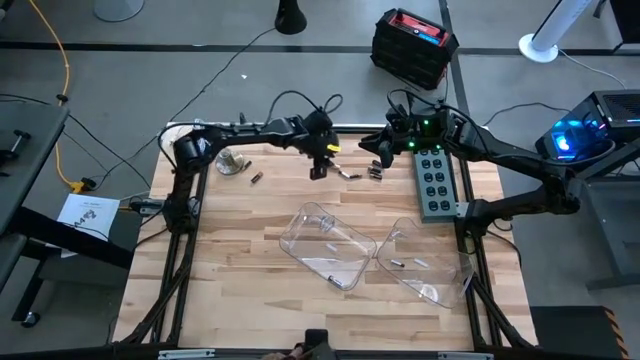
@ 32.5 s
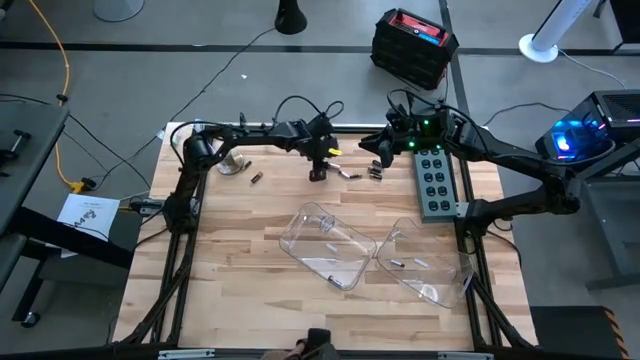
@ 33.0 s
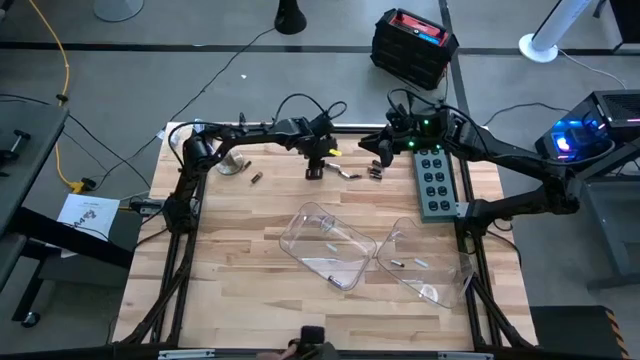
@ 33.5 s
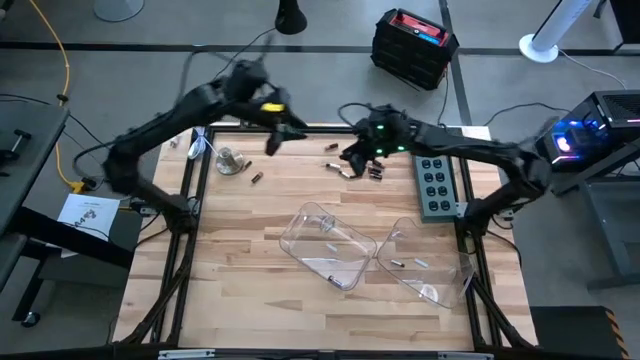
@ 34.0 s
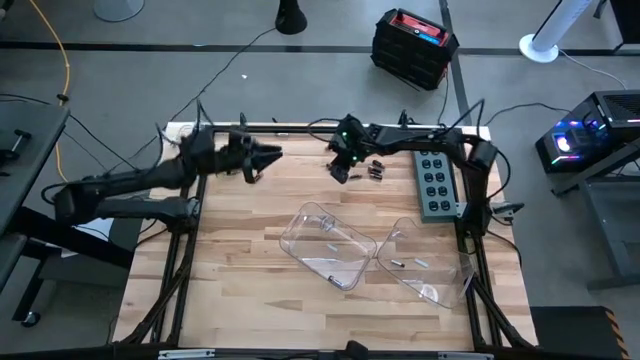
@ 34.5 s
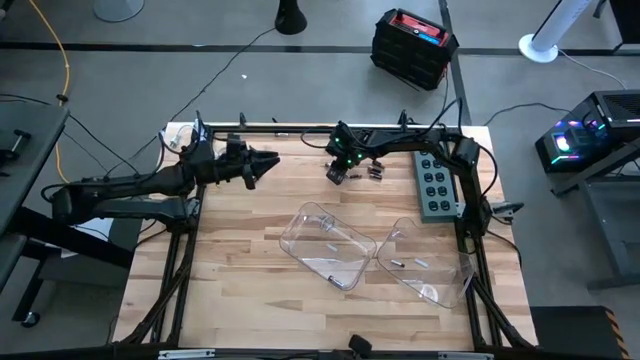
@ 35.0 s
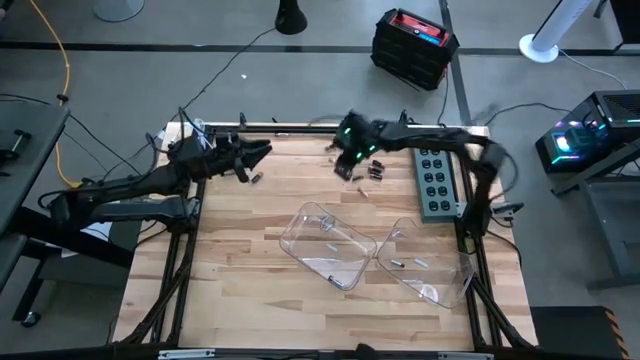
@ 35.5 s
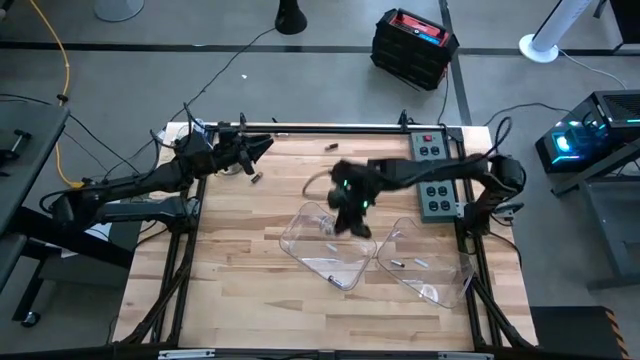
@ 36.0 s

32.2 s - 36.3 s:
Task: Sort batteries
Put the silver battery into the left transparent bin

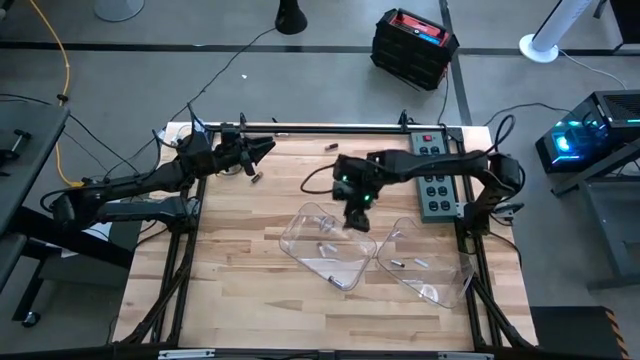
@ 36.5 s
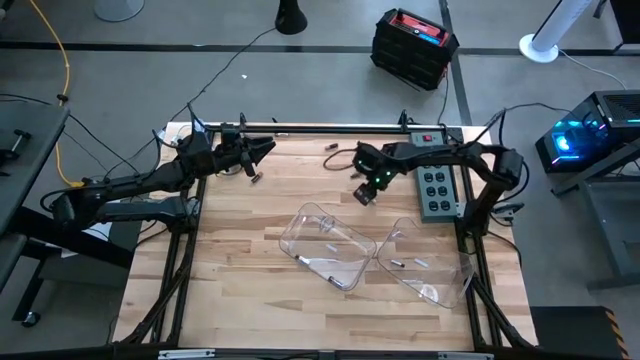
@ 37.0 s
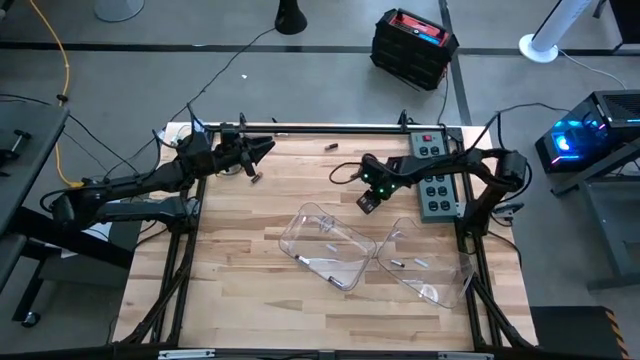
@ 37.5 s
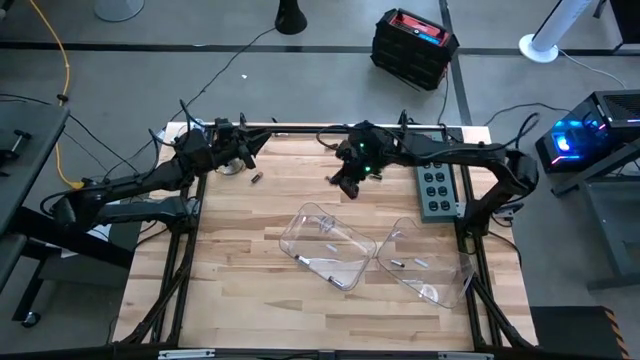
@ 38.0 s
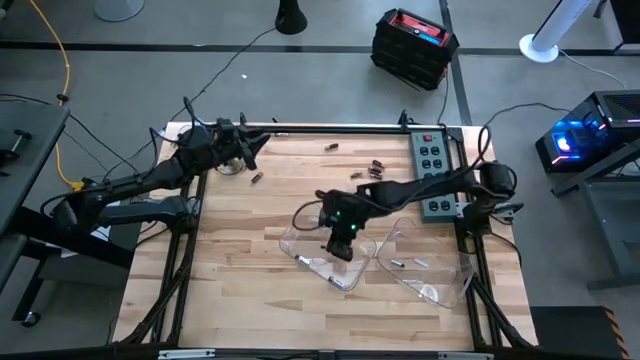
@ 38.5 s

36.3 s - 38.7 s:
Put the silver battery into the left transparent bin

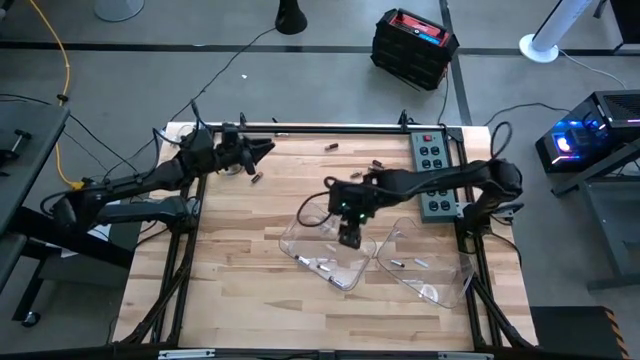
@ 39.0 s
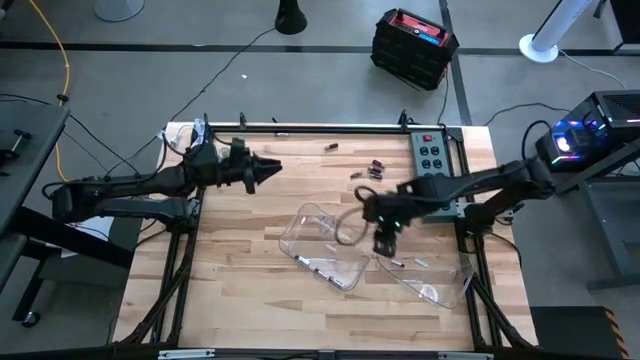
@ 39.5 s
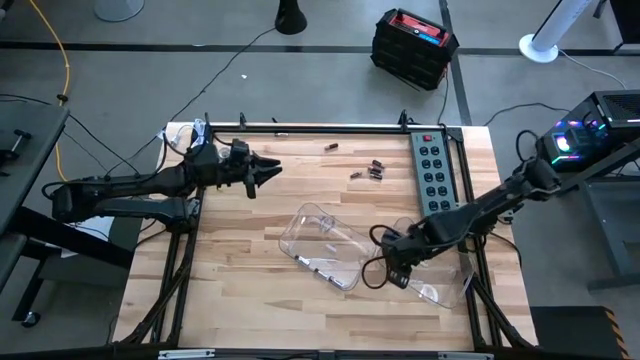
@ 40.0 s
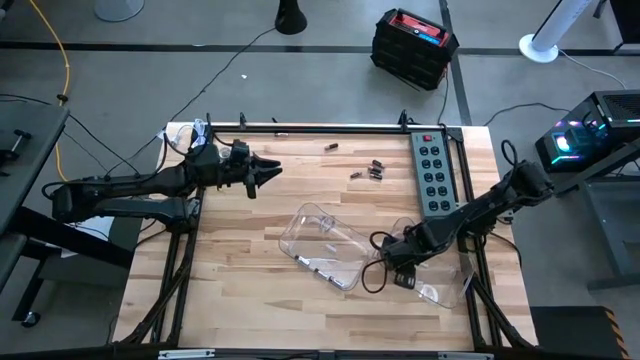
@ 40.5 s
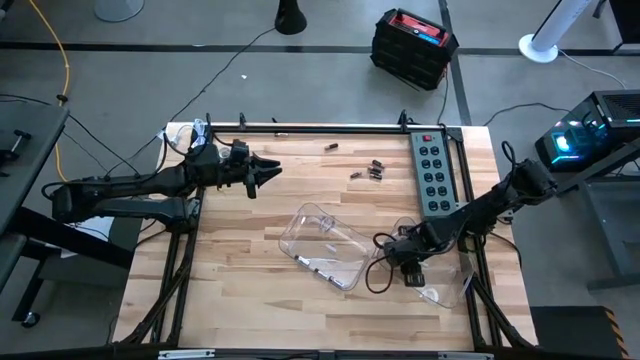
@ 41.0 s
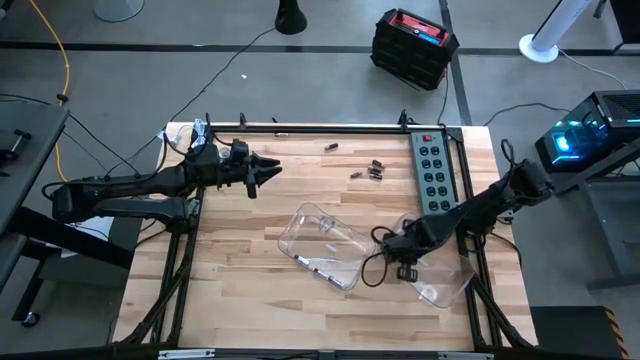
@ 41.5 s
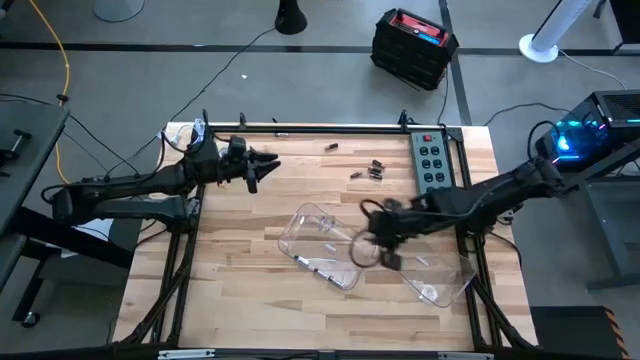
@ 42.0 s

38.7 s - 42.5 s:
Put the silver battery into the left transparent bin

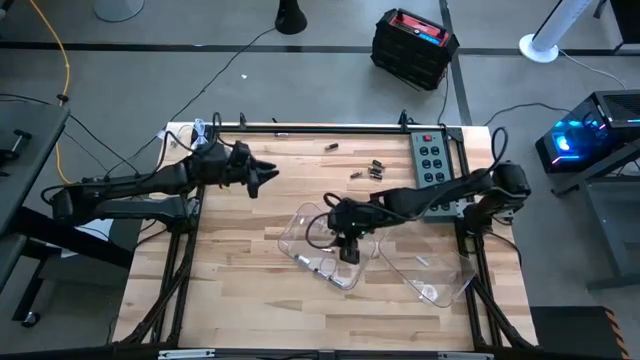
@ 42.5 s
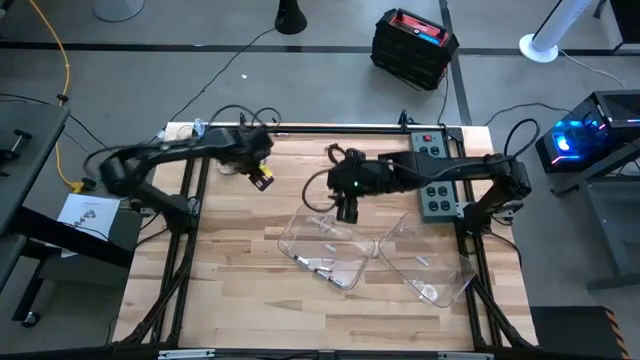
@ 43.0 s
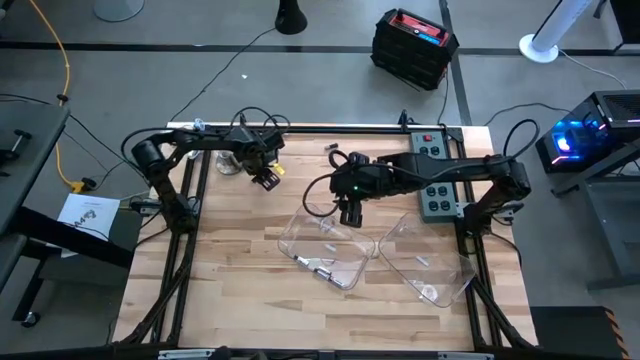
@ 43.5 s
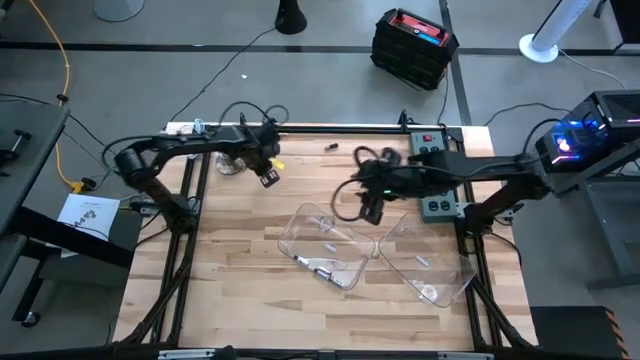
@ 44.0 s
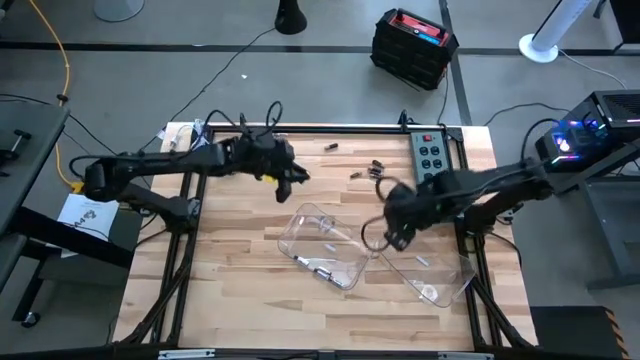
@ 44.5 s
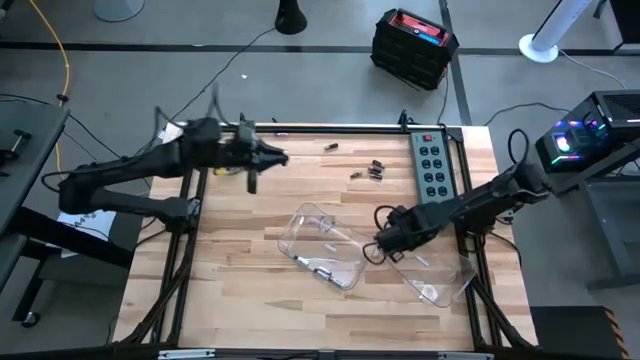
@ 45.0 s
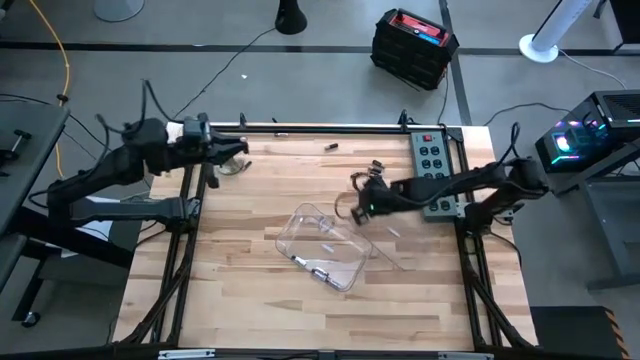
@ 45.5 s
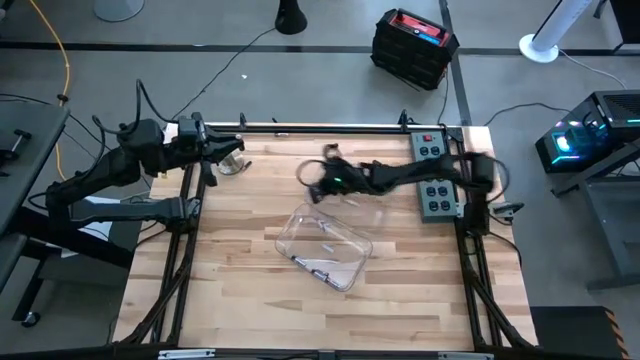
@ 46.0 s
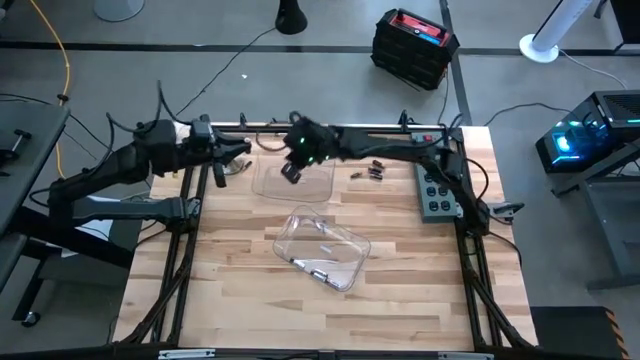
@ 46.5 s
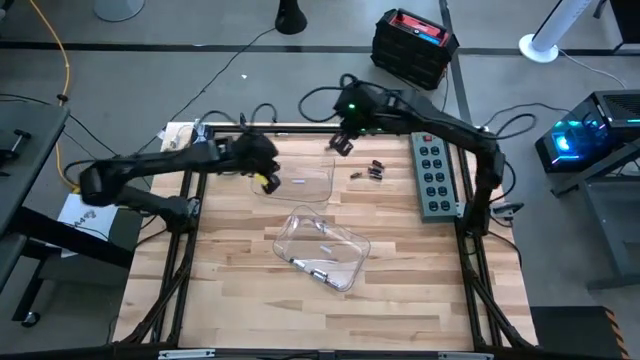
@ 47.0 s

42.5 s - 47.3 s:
Put the black battery into the top transparent bin

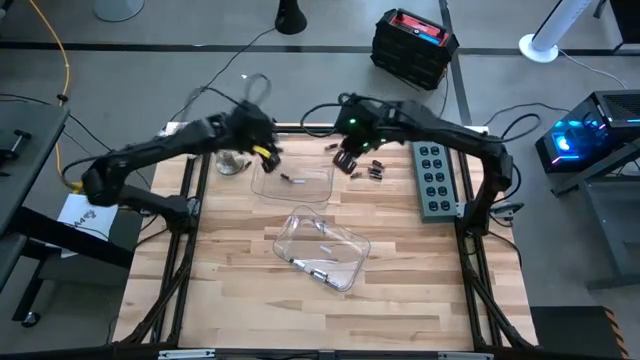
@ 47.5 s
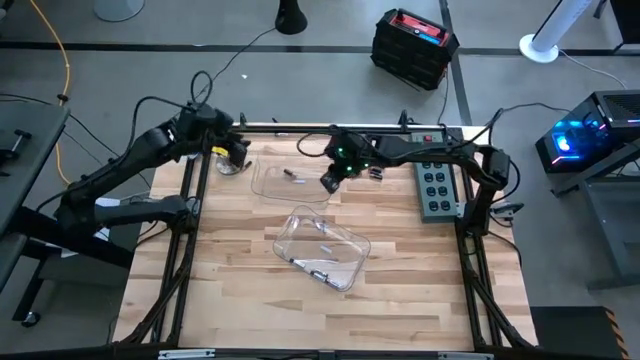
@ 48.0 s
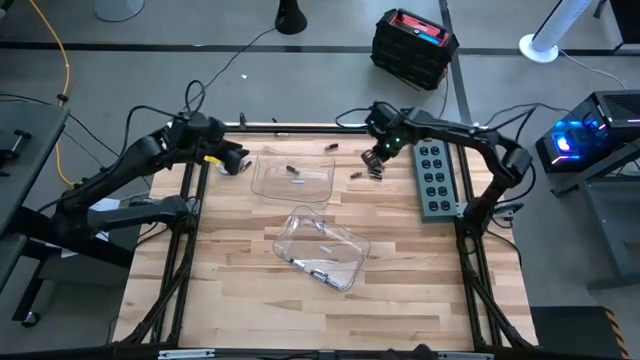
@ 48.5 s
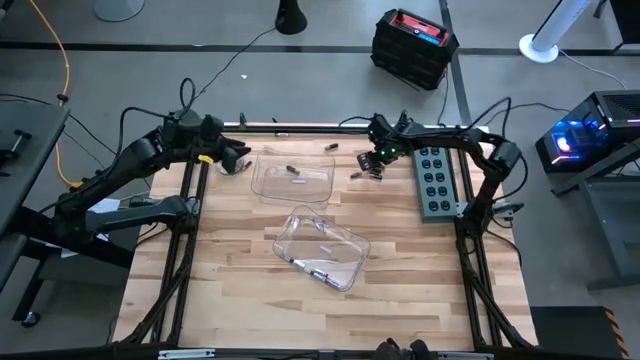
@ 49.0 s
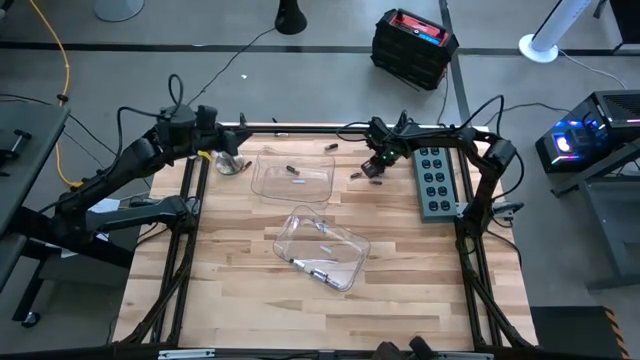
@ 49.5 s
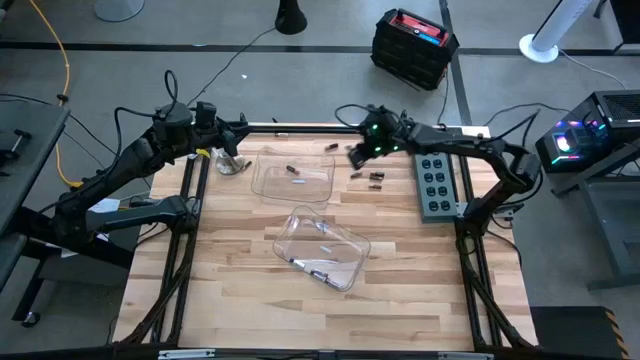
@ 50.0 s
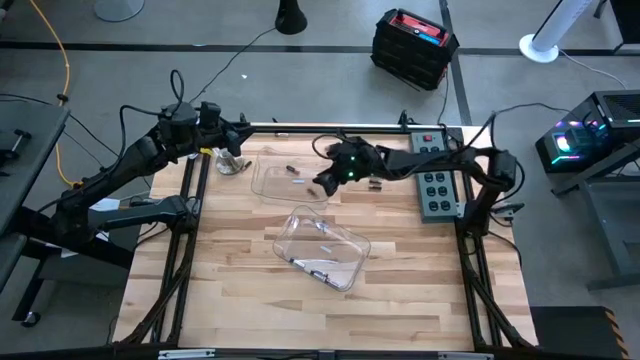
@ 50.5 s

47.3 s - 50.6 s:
Put the black battery into the top transparent bin

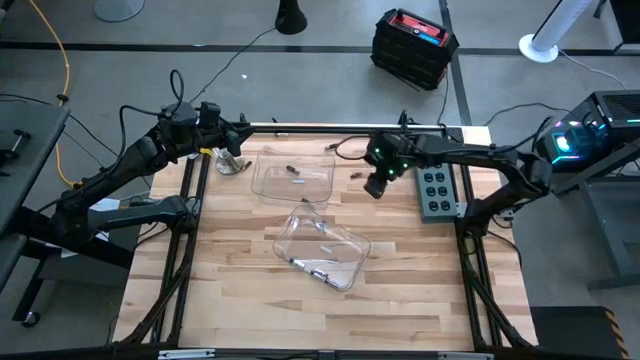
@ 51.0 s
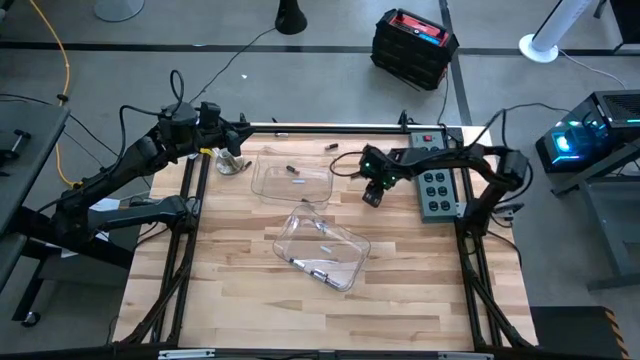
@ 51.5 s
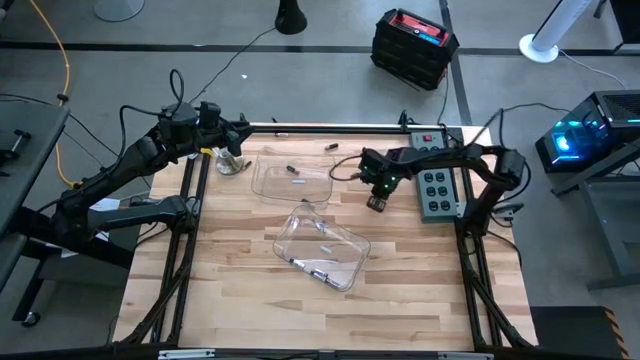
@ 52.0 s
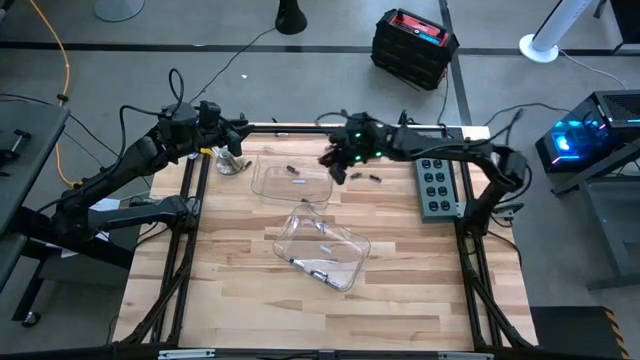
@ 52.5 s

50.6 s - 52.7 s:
Put the black battery into the top transparent bin

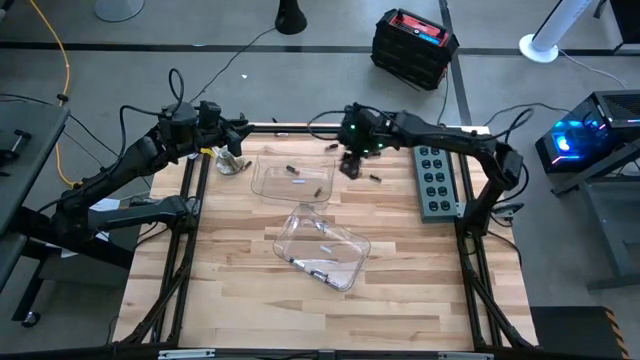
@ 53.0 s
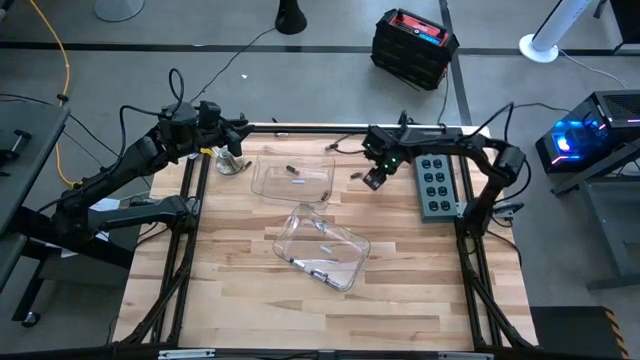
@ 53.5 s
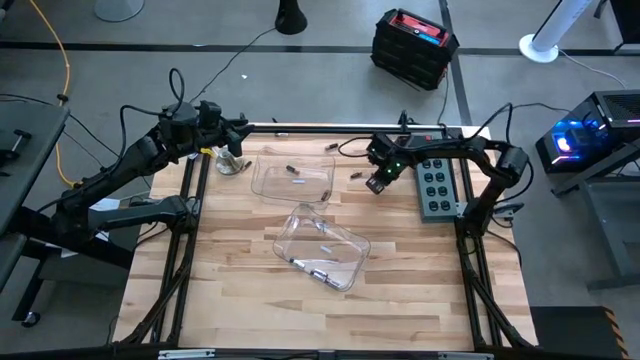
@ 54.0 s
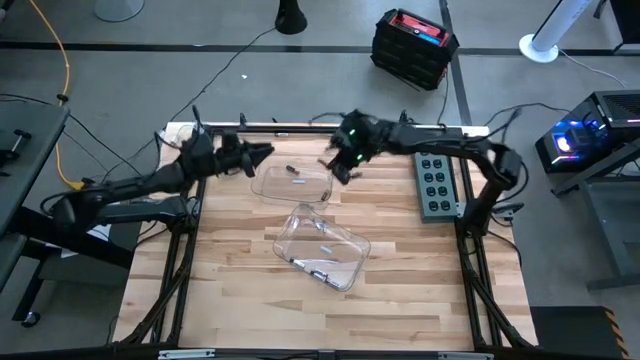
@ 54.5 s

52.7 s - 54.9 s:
Put the black battery into the top transparent bin
